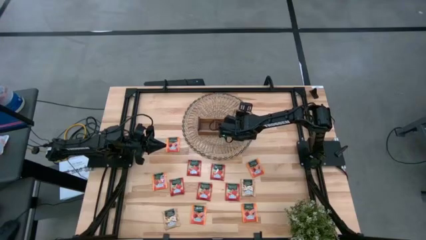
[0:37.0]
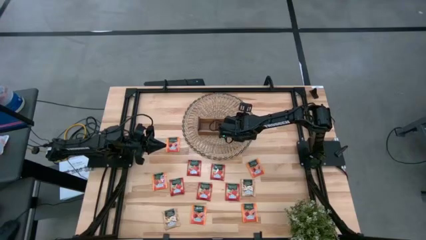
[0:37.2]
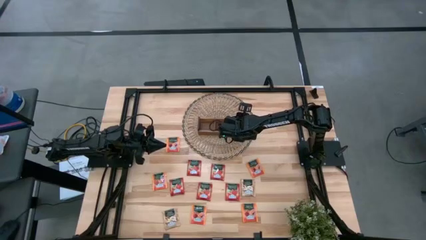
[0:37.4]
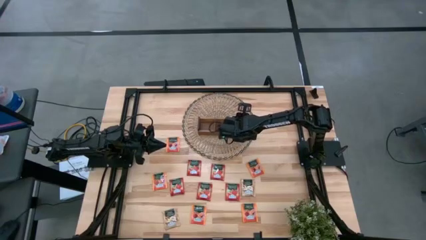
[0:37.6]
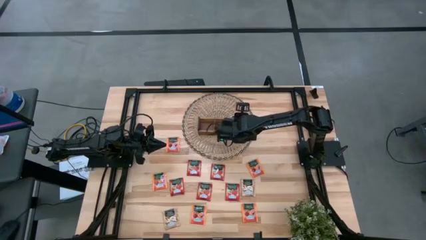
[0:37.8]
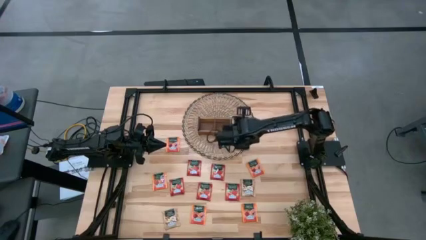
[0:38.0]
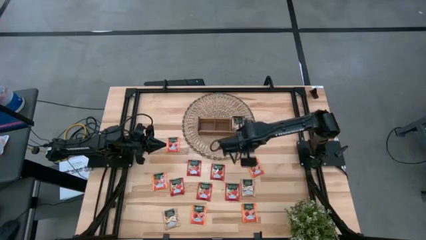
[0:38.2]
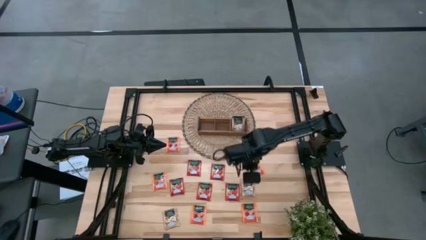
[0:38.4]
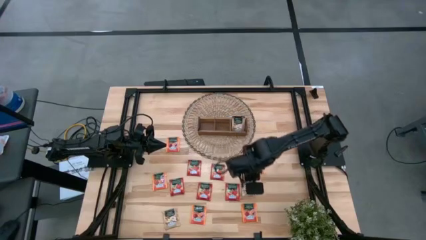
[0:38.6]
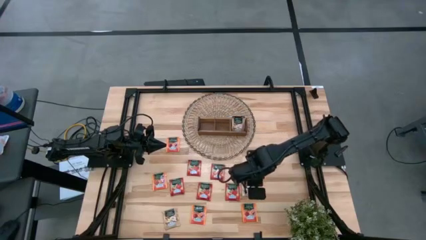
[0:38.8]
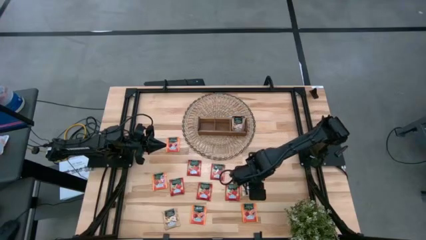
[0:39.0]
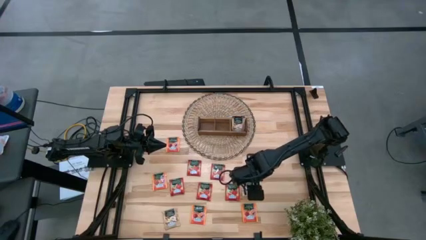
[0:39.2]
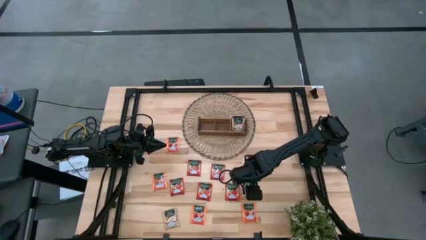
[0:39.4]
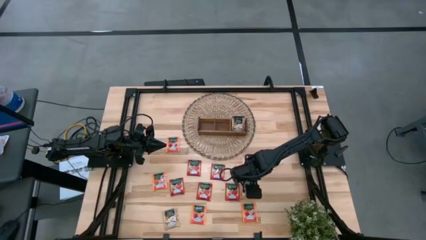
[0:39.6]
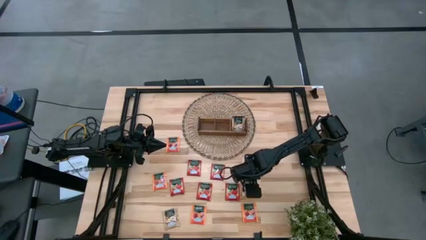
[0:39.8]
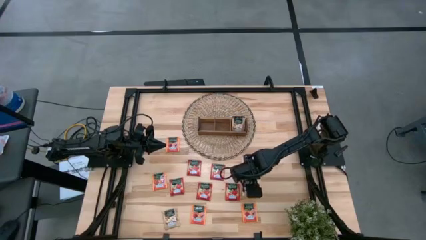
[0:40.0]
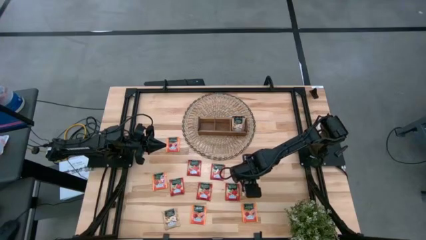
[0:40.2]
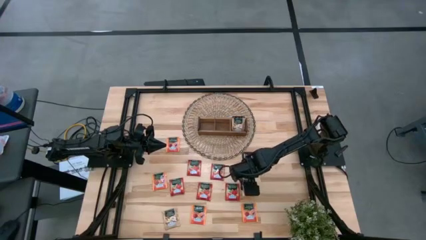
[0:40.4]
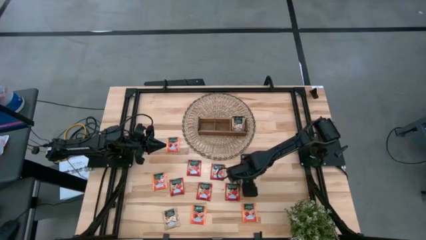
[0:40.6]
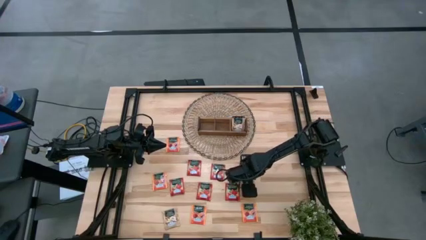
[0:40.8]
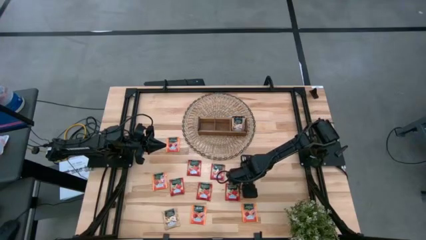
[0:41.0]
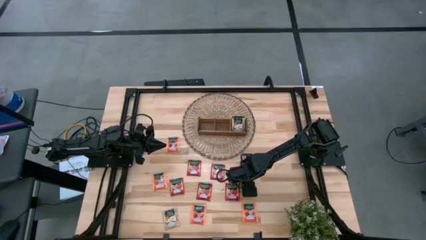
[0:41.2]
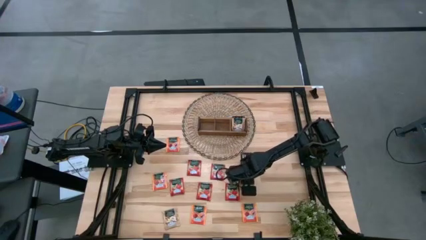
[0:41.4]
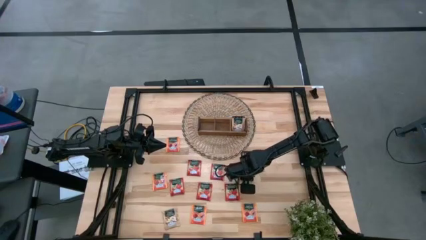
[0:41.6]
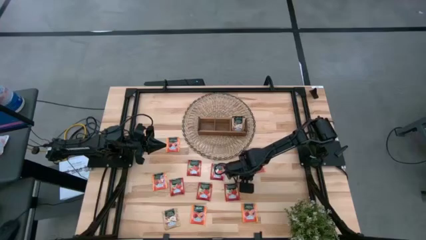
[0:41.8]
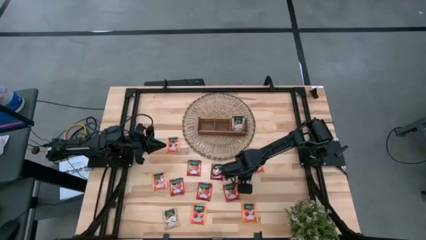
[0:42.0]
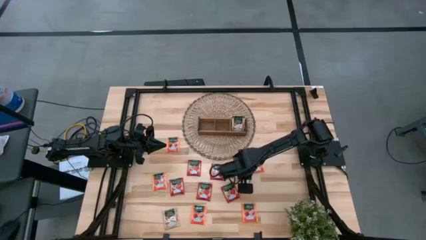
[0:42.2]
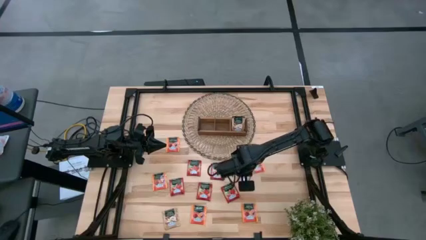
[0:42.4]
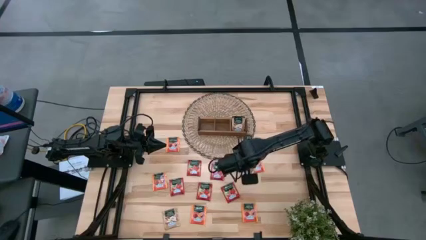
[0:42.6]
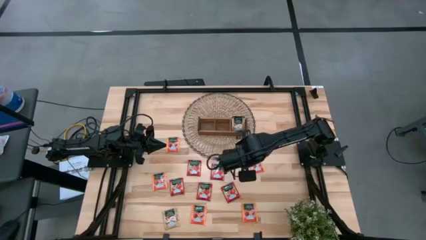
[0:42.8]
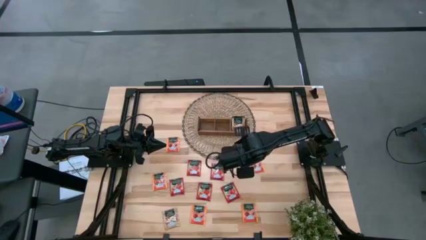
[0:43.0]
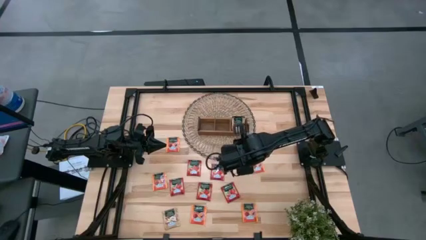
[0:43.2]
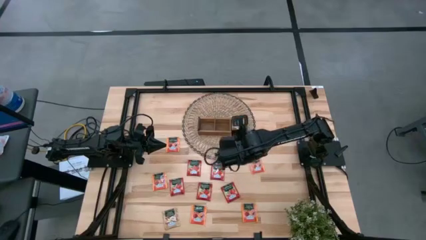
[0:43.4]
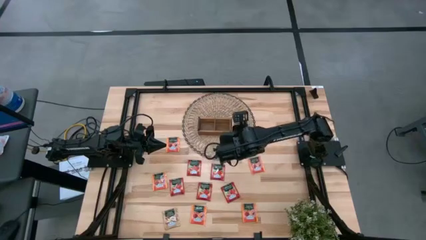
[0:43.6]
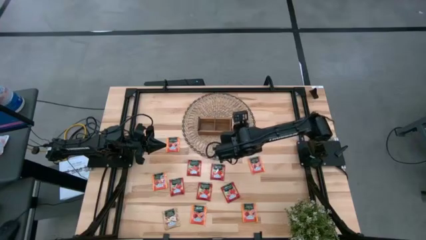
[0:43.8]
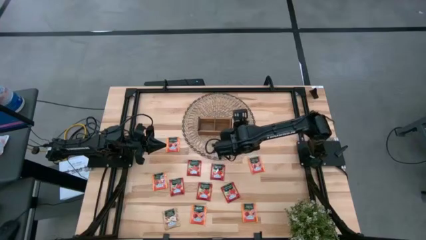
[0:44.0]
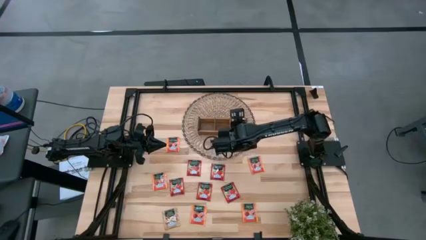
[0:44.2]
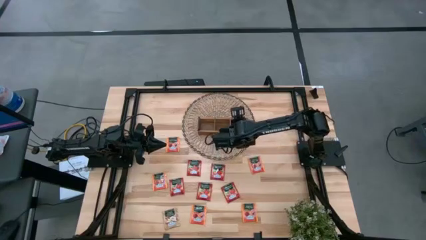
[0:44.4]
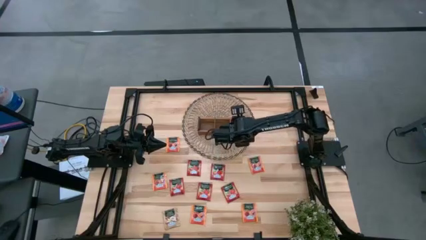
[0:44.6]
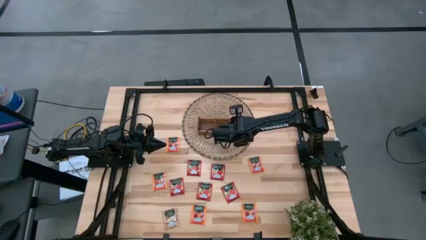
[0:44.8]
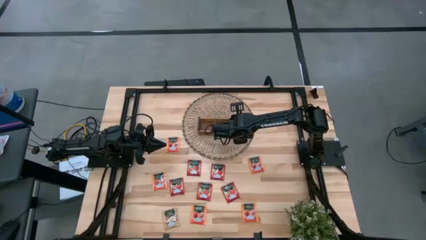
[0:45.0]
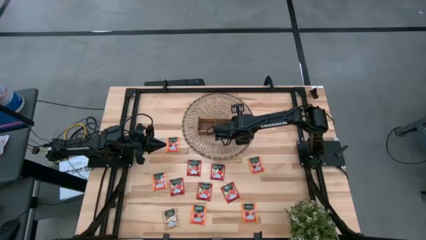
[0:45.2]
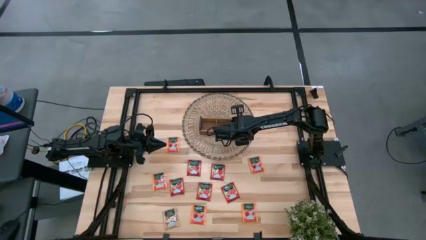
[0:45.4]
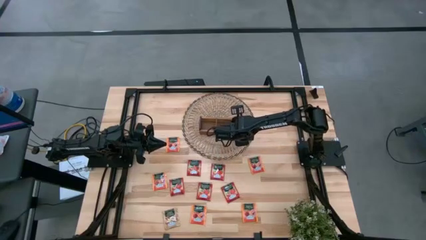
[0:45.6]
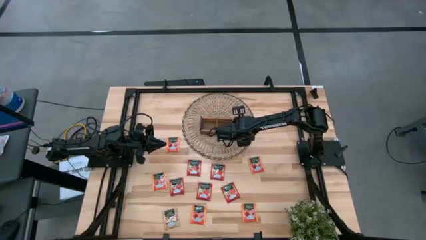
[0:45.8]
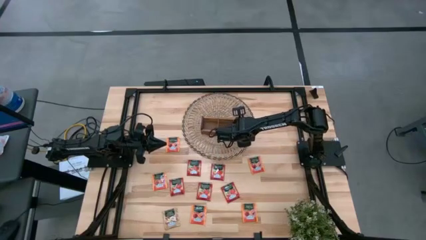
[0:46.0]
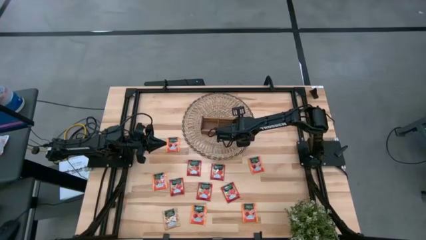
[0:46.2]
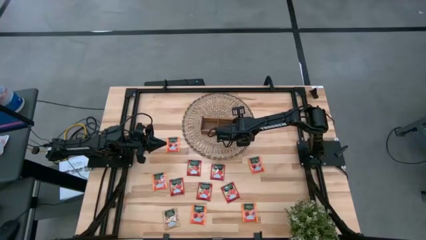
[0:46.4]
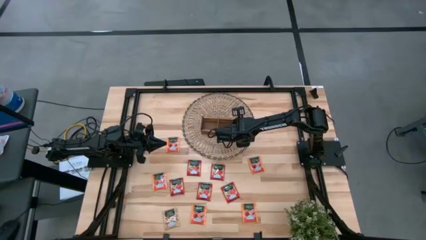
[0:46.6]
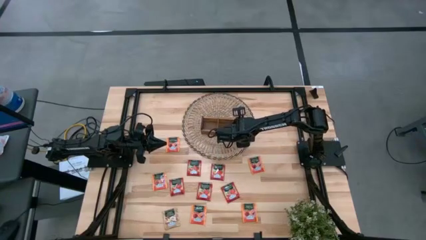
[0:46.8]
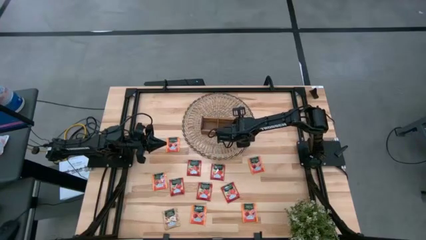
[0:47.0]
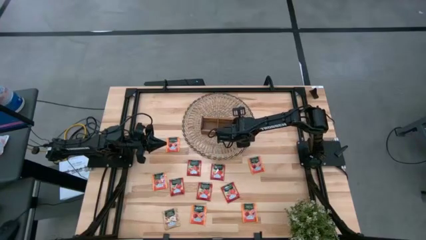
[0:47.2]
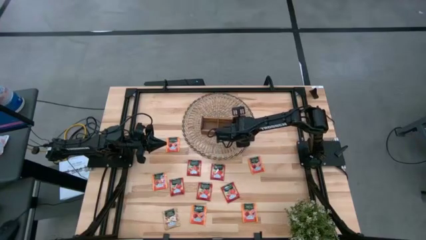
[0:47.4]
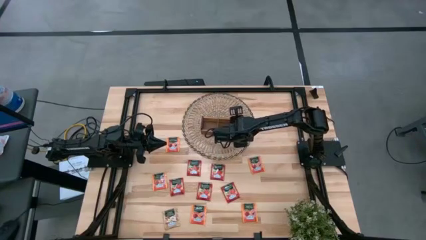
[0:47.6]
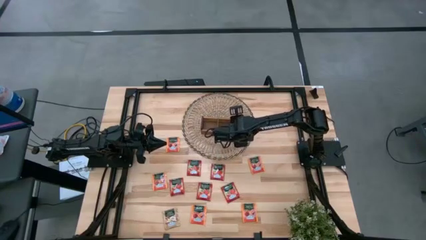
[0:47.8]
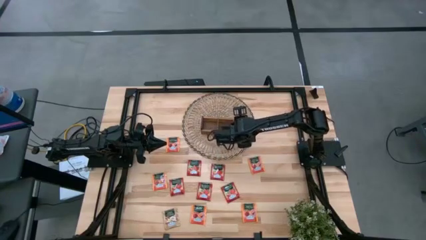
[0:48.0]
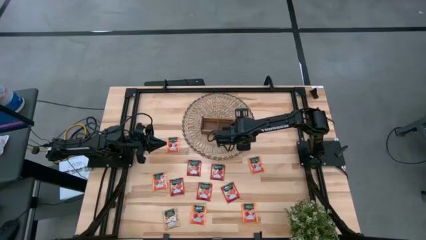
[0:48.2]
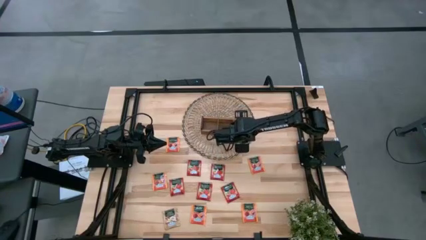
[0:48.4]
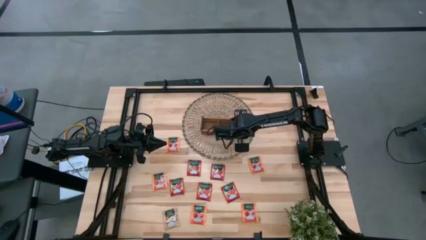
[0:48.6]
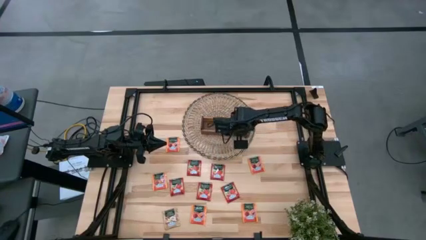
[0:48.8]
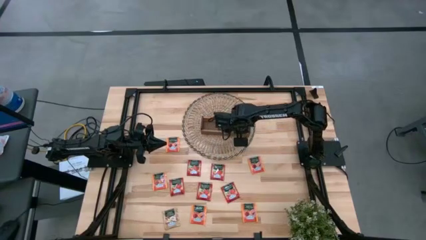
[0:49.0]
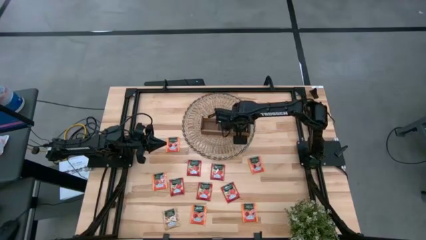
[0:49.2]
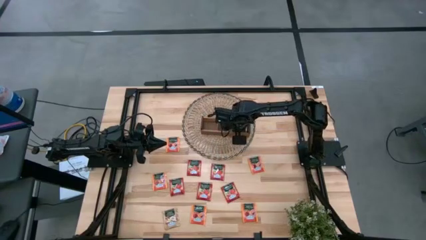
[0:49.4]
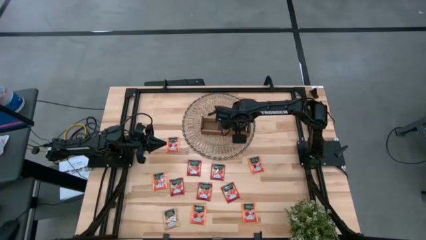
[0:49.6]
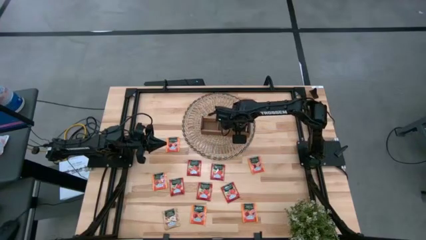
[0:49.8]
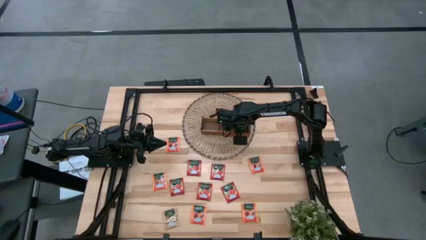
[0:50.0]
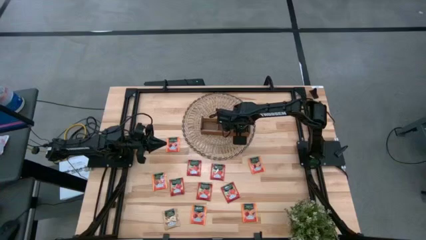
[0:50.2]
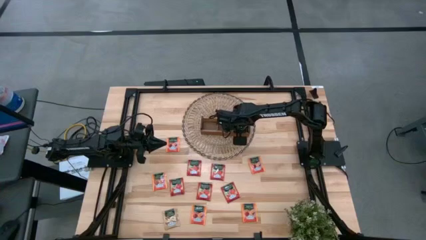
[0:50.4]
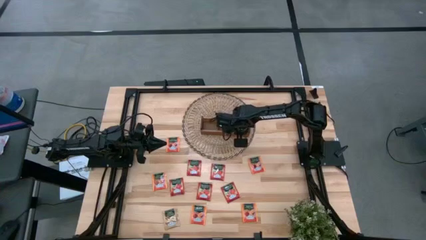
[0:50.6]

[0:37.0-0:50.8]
Task: Pick & Place Tea
Put the right brown tea bag into the right slot of the wooden organizer
